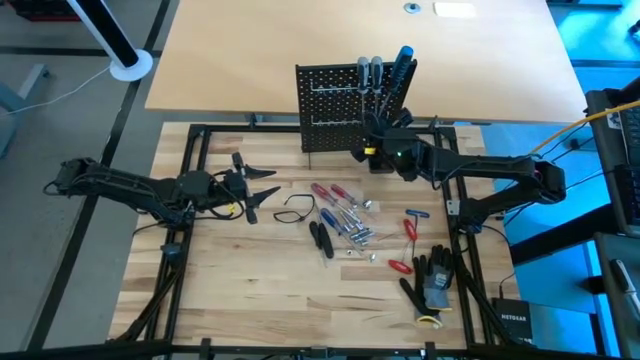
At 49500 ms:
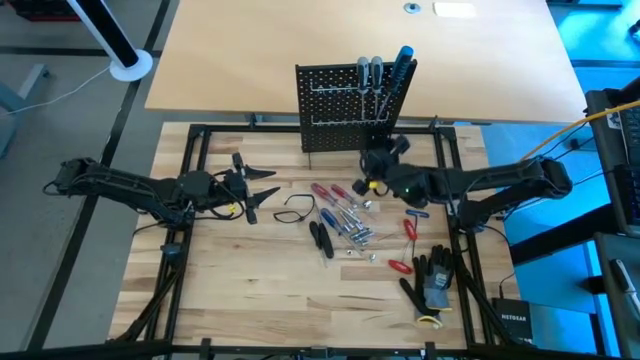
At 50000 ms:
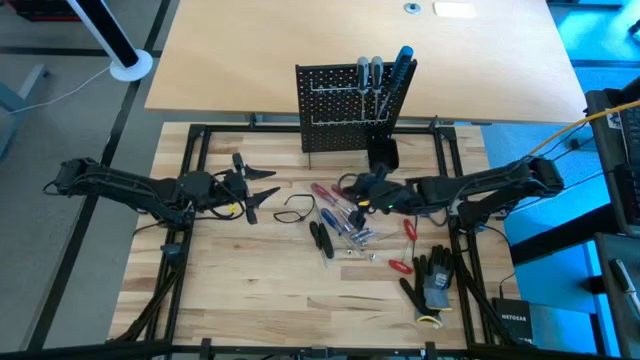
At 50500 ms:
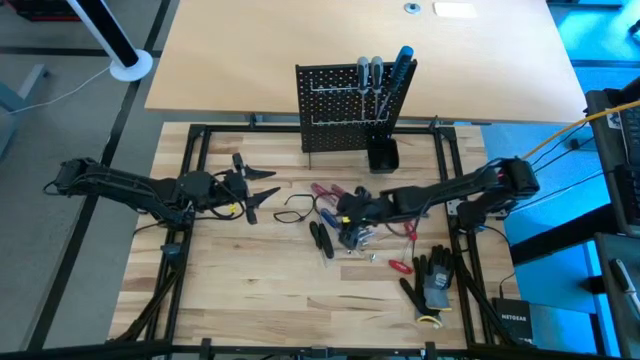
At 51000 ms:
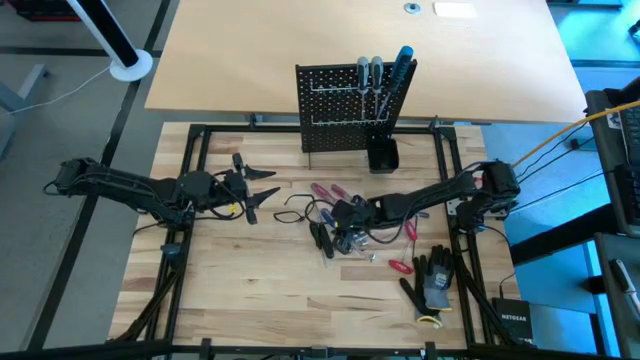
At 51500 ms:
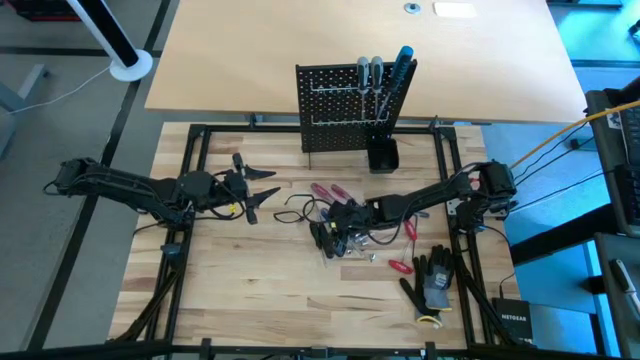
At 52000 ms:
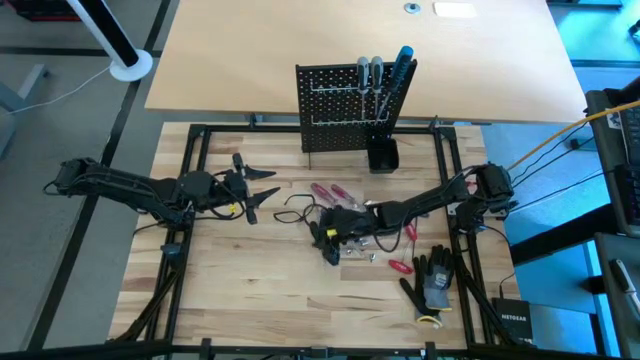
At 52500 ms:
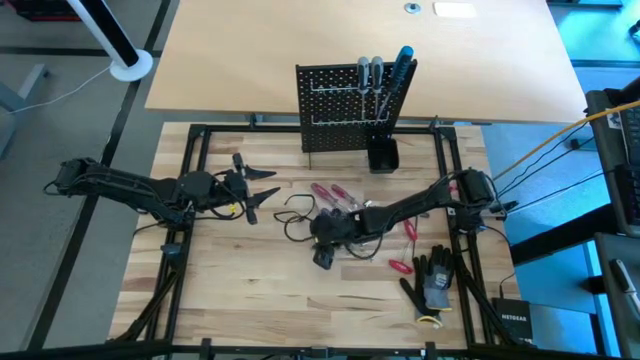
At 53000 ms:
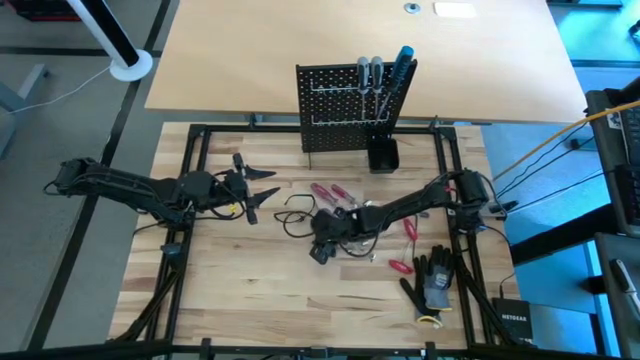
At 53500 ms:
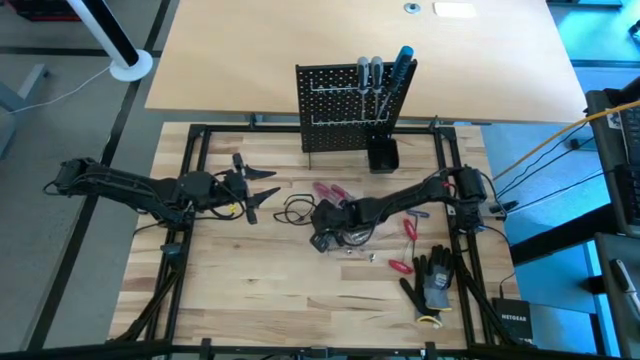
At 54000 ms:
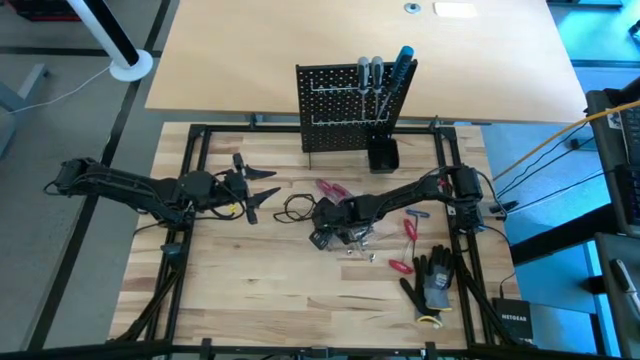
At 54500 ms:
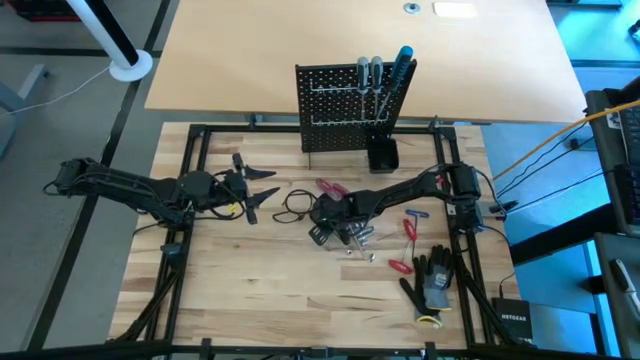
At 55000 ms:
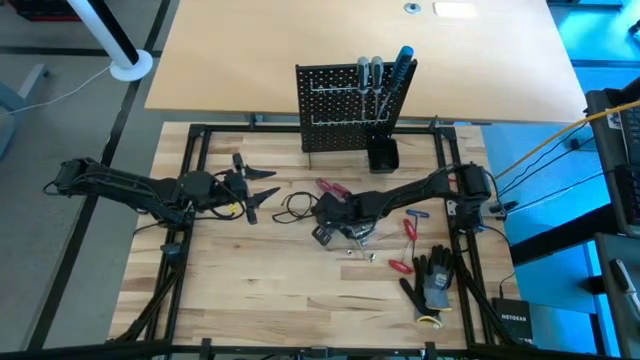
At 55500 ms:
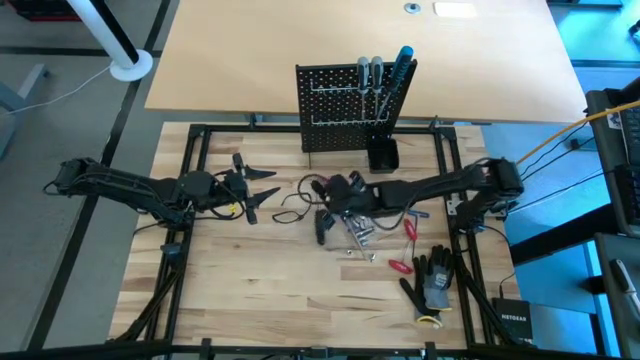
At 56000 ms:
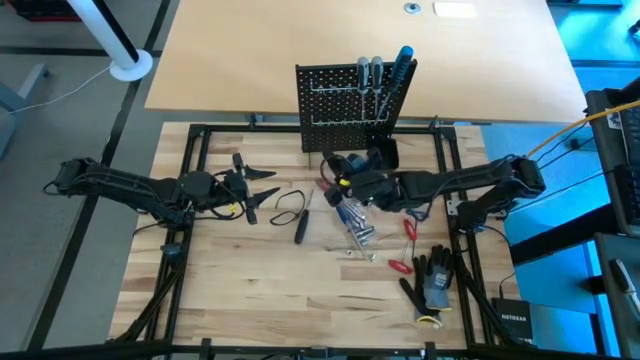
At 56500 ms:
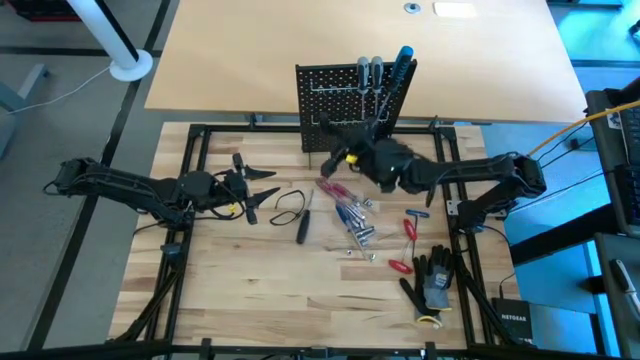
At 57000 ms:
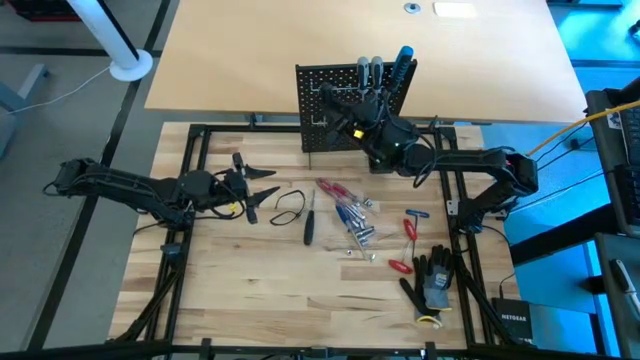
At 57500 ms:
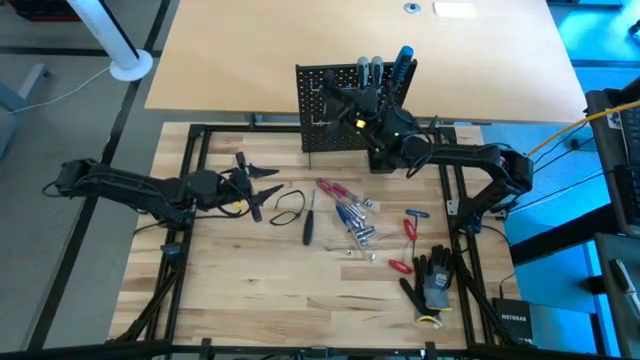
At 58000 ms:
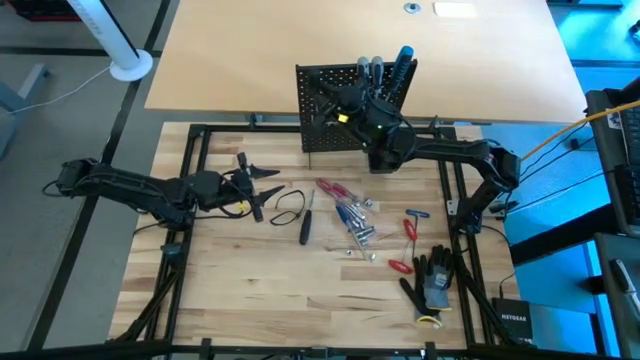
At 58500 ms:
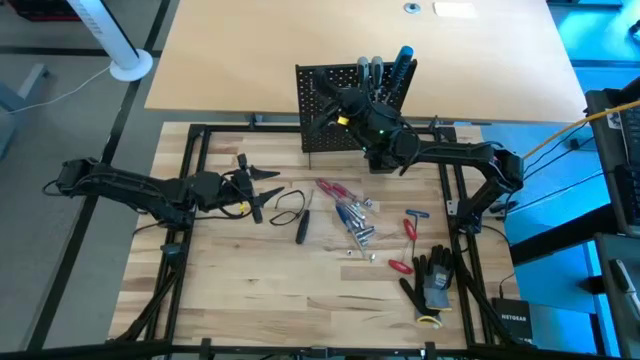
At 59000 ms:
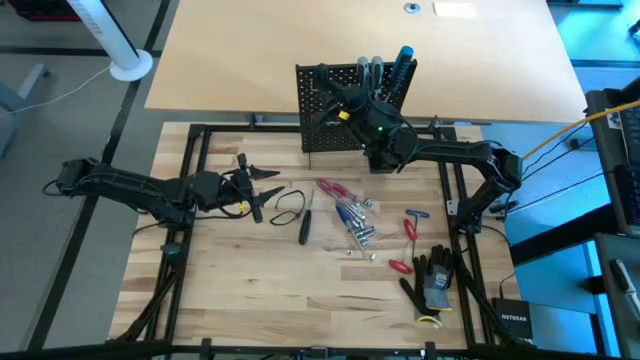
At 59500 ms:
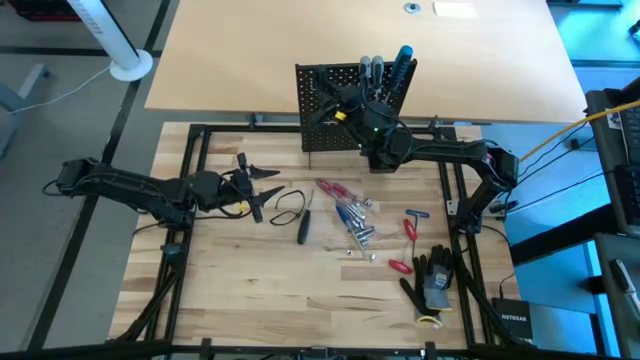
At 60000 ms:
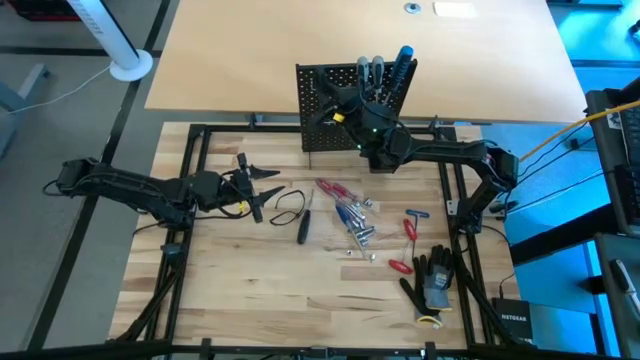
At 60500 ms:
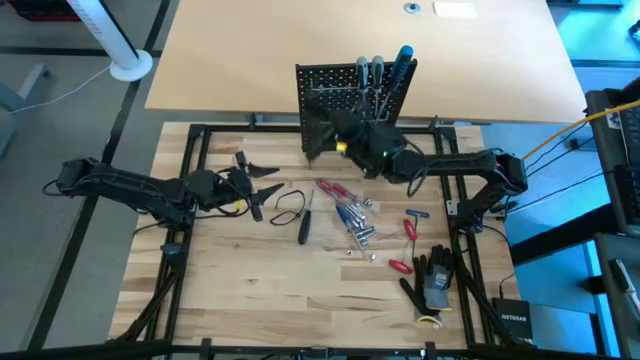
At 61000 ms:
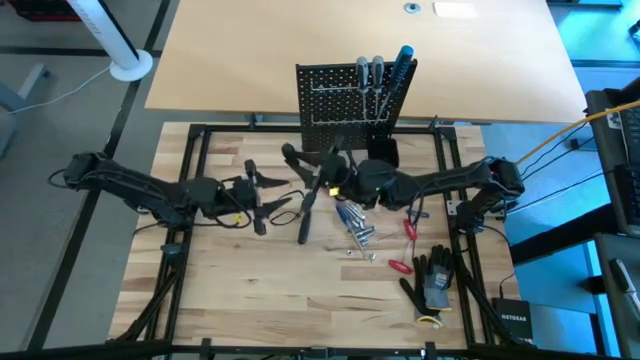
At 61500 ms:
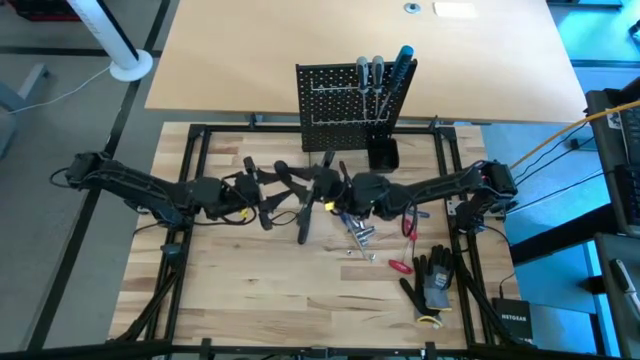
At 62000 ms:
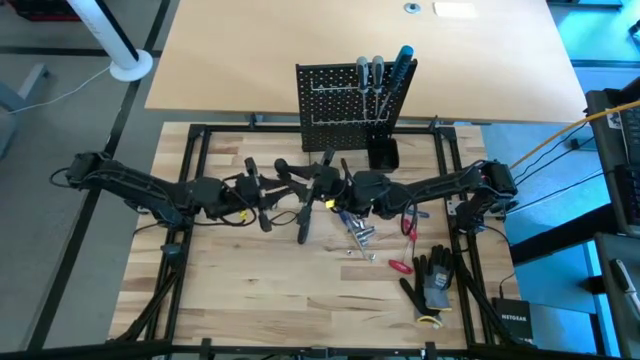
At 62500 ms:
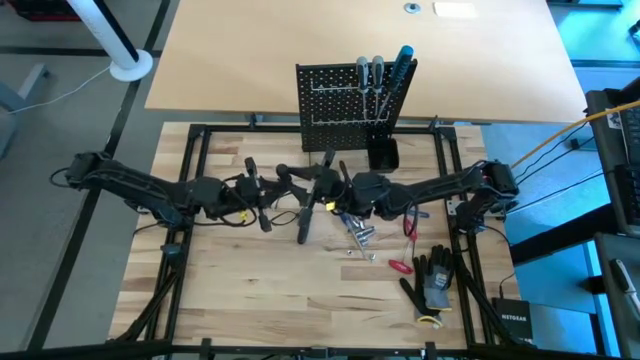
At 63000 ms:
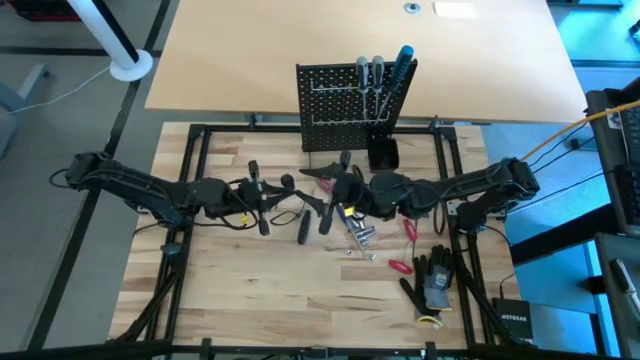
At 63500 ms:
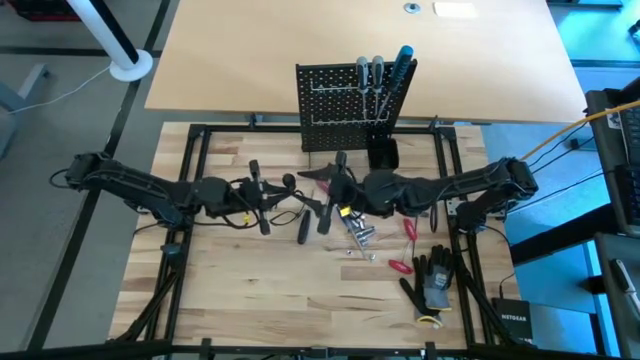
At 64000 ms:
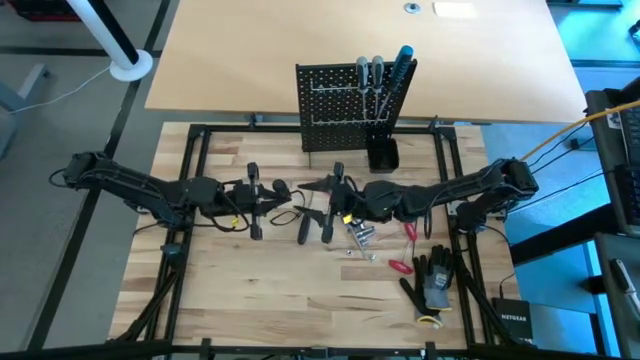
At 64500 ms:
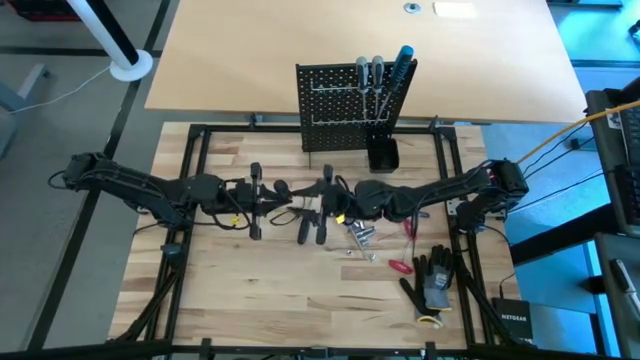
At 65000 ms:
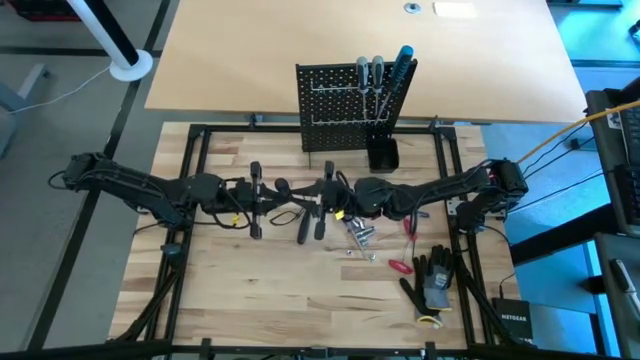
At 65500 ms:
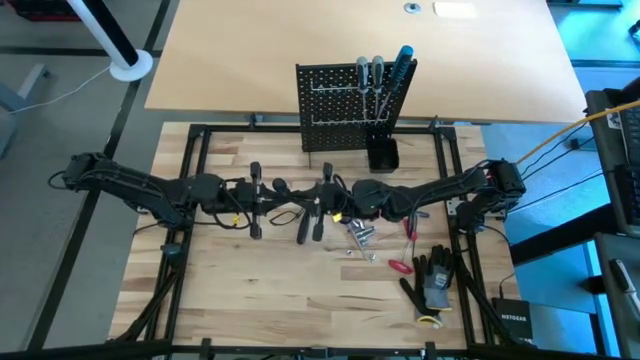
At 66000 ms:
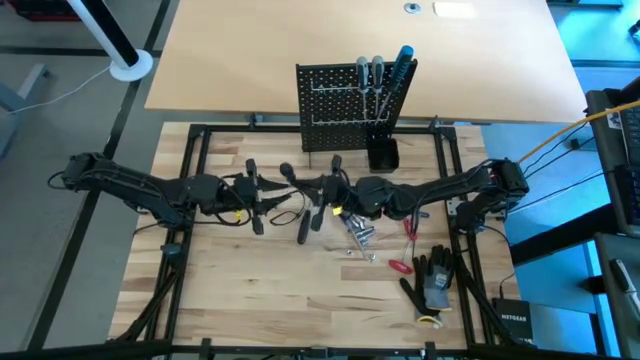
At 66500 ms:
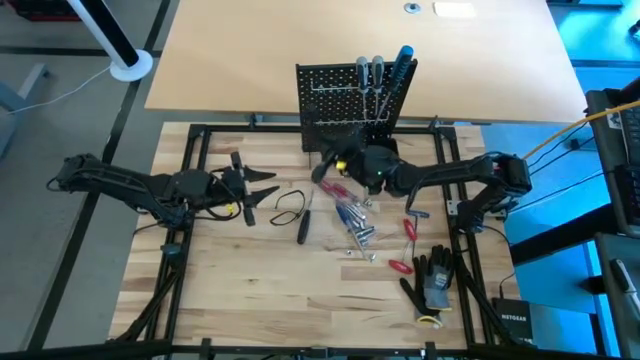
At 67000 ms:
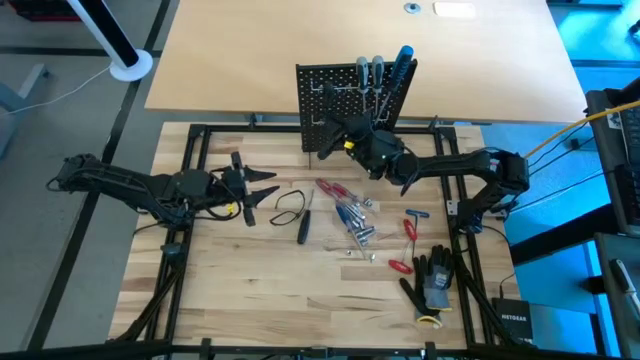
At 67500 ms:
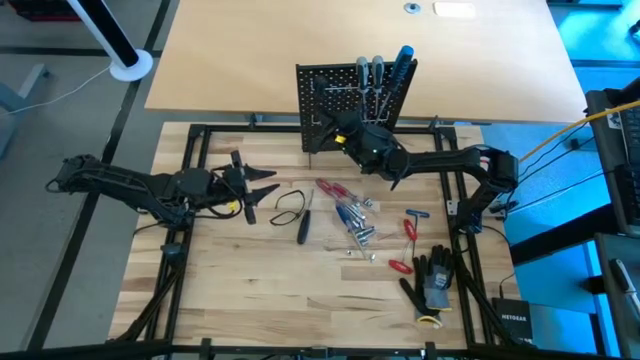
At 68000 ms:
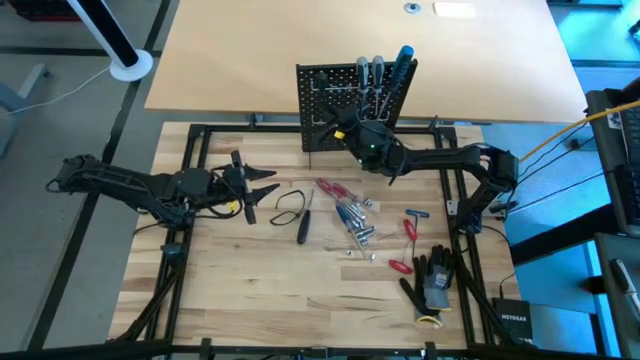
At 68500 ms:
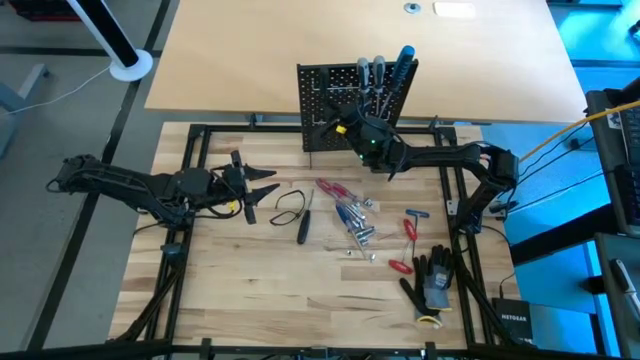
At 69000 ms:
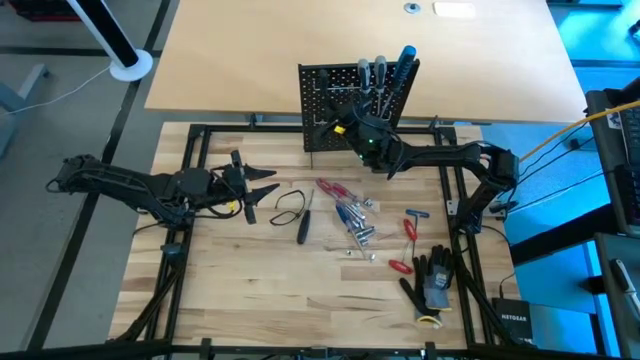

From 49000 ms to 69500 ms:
Task: Hang tools onto peg board
Hang the black screwdriver on the peg board

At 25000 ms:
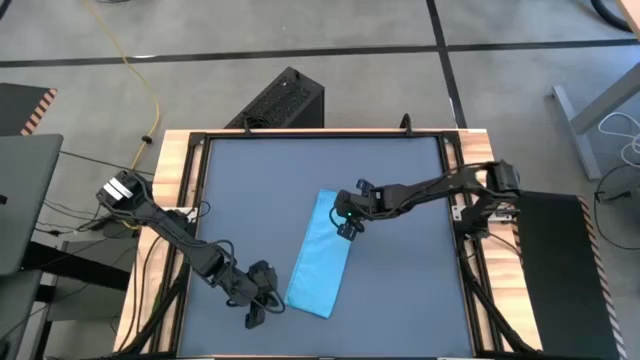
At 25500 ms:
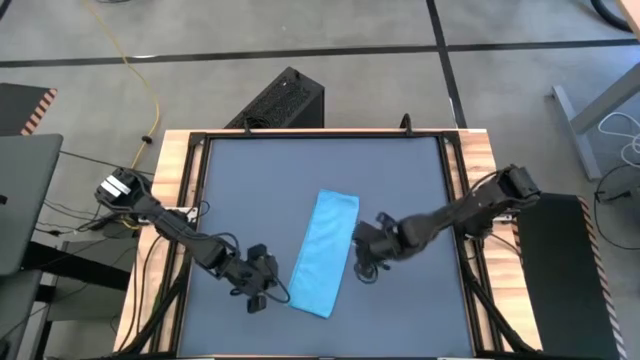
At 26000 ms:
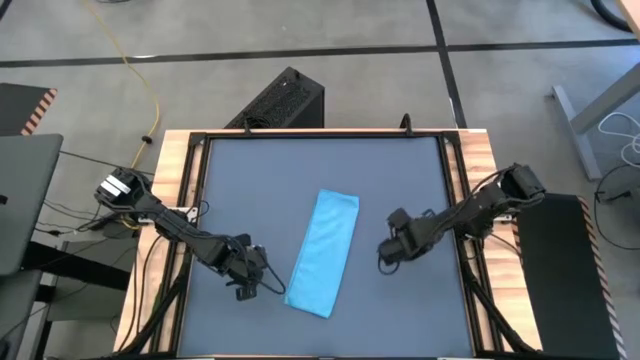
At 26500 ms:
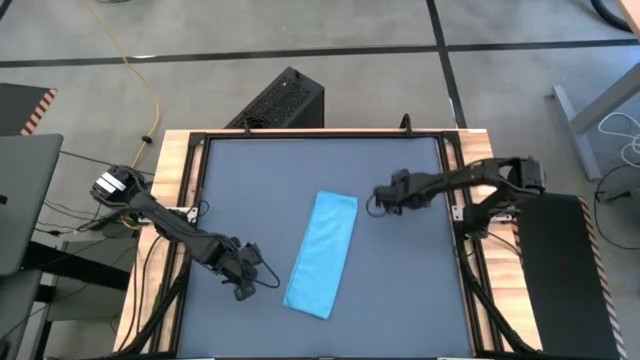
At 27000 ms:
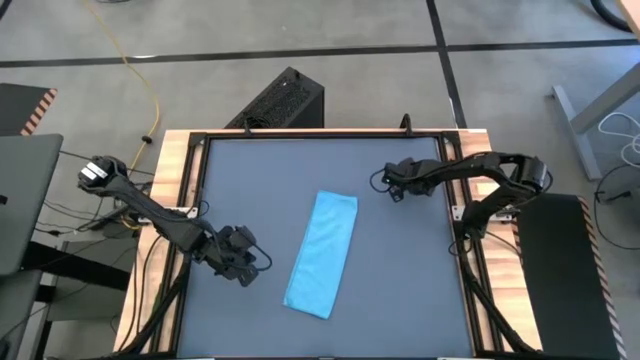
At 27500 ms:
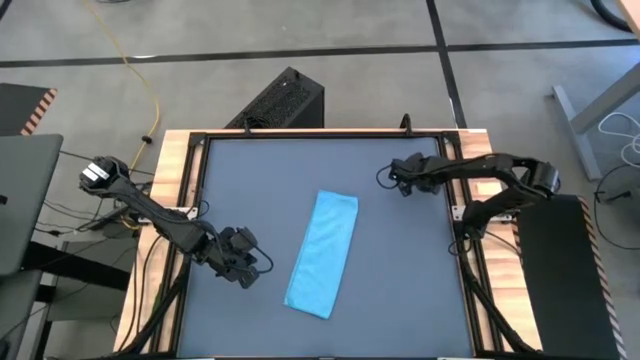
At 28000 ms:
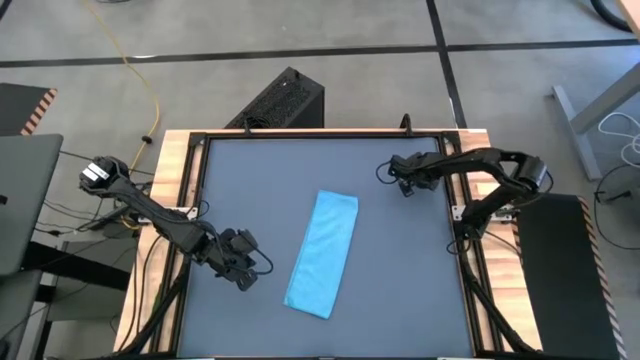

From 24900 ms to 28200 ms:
Task: Roll towel
Adjust the blue mat
